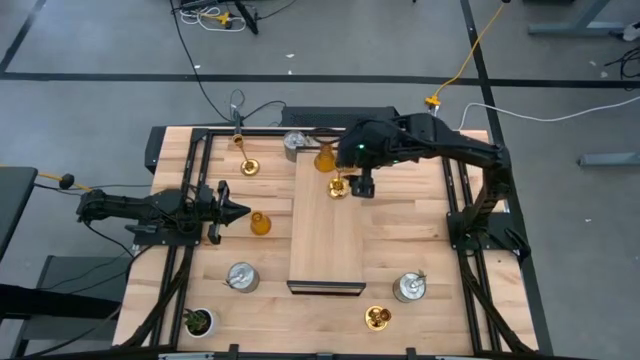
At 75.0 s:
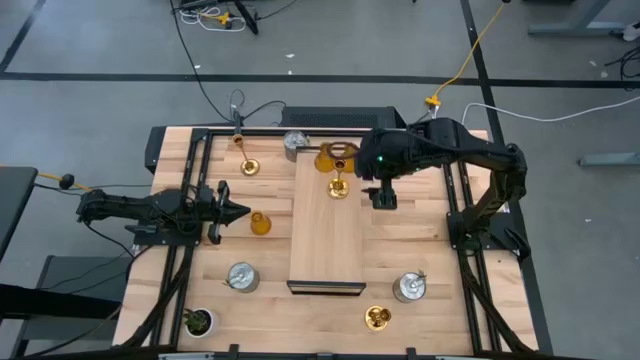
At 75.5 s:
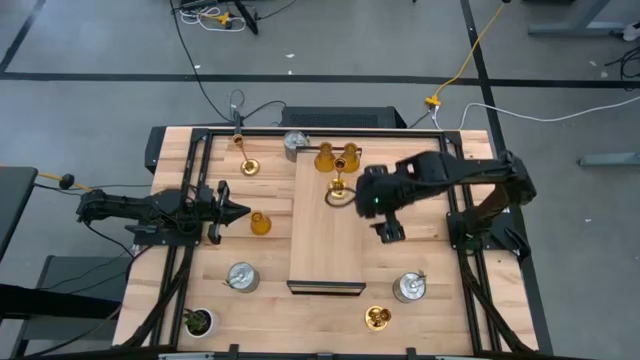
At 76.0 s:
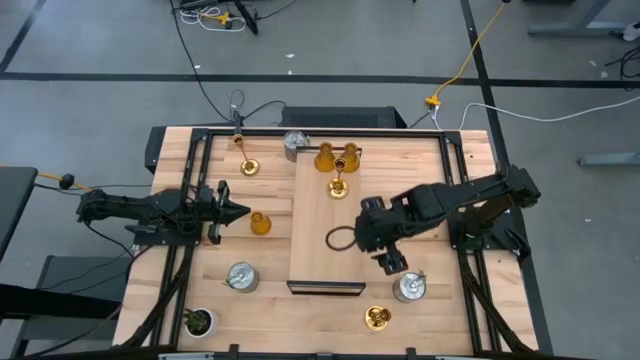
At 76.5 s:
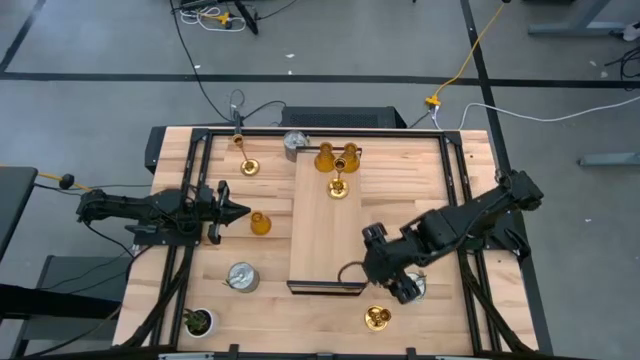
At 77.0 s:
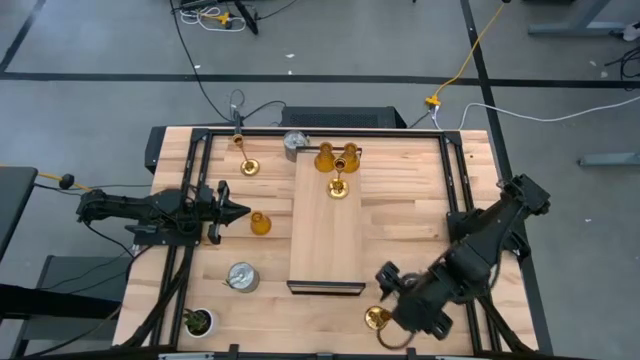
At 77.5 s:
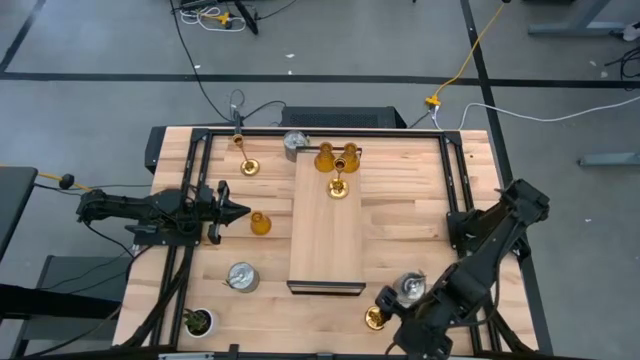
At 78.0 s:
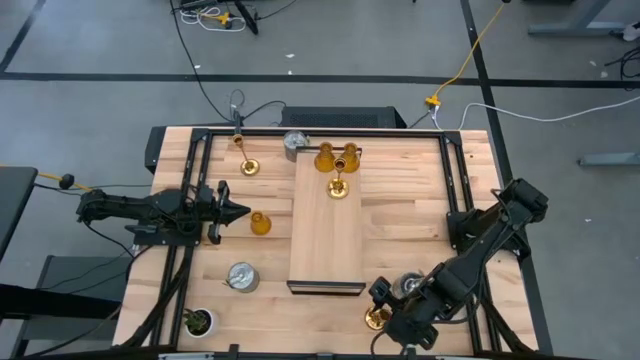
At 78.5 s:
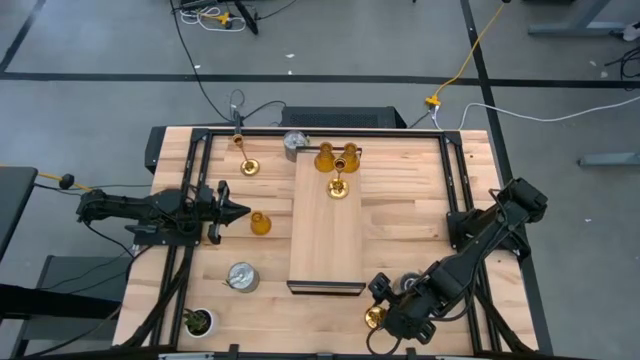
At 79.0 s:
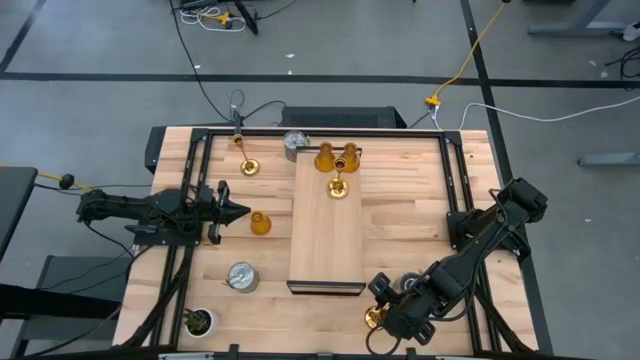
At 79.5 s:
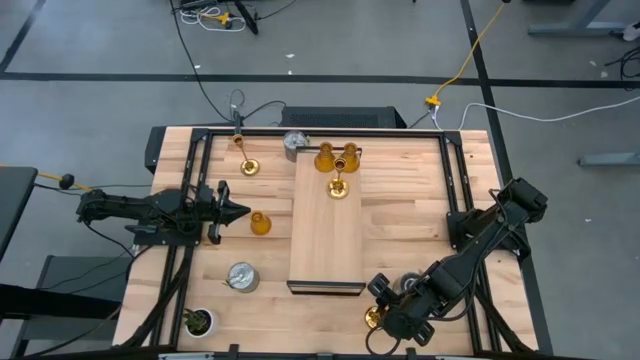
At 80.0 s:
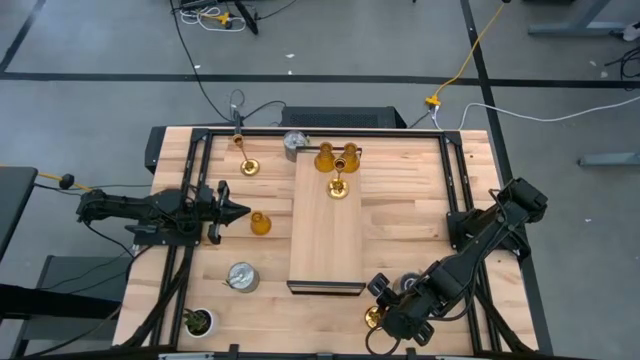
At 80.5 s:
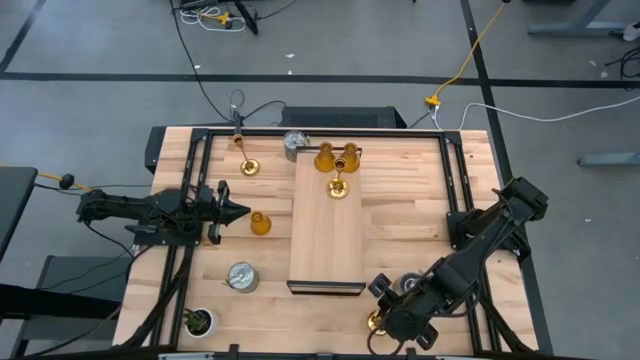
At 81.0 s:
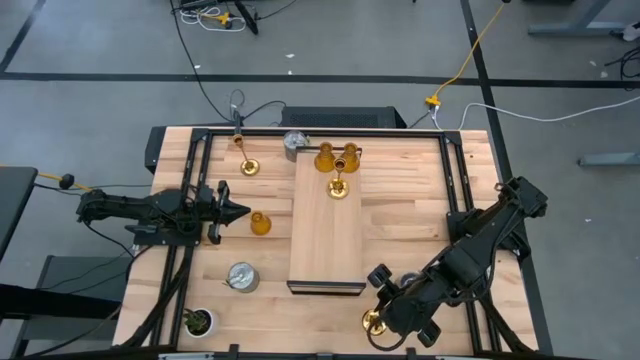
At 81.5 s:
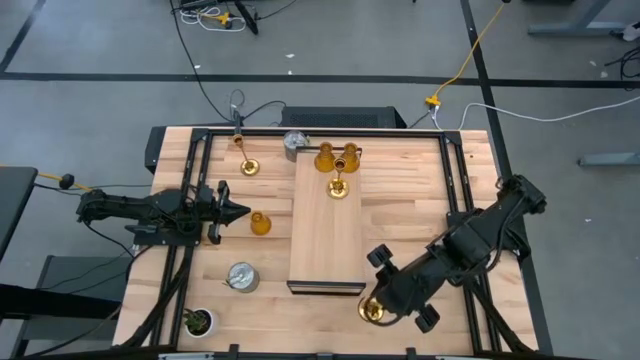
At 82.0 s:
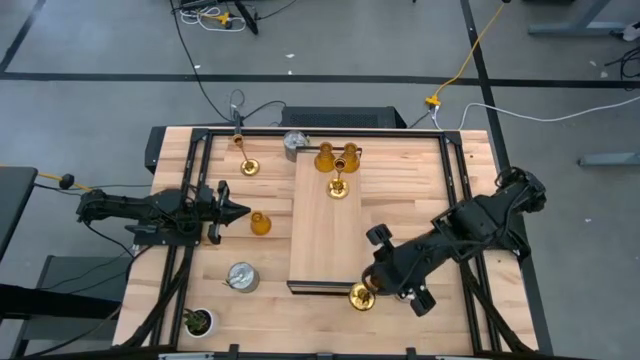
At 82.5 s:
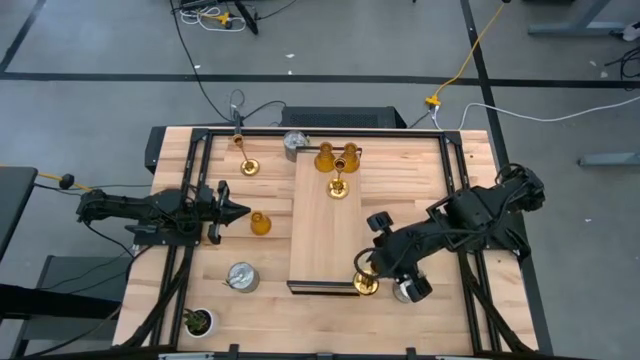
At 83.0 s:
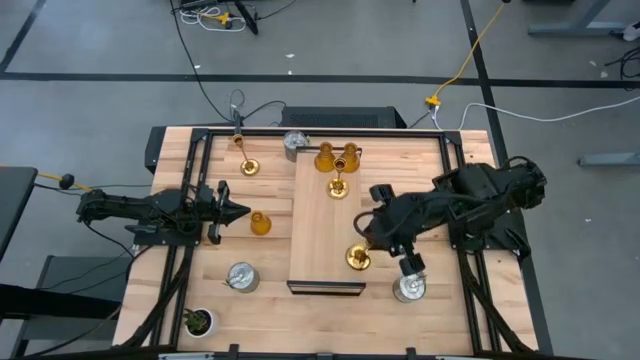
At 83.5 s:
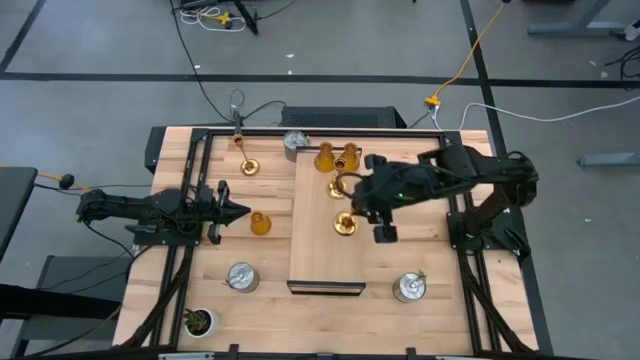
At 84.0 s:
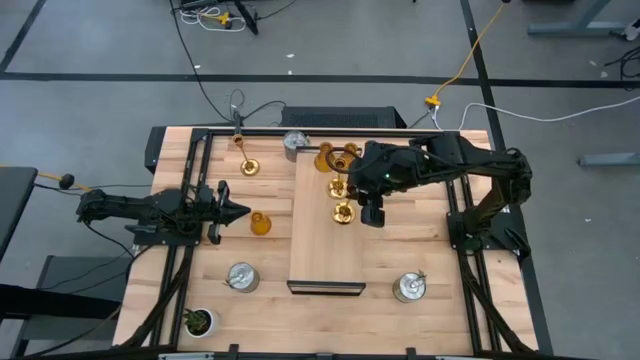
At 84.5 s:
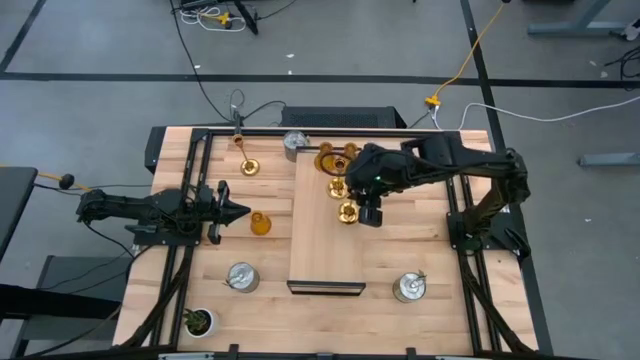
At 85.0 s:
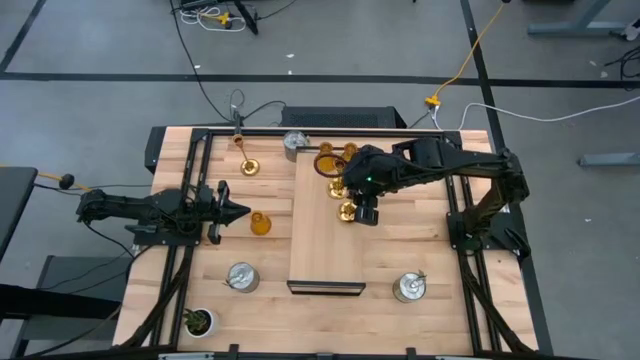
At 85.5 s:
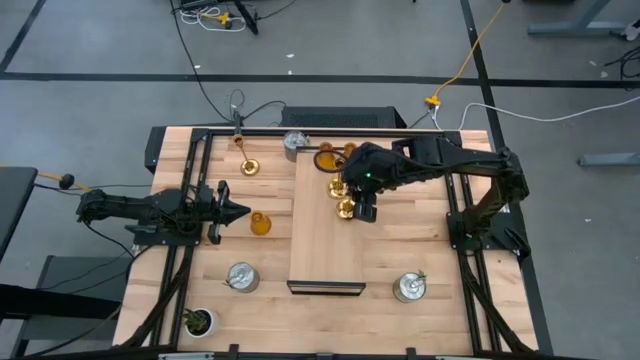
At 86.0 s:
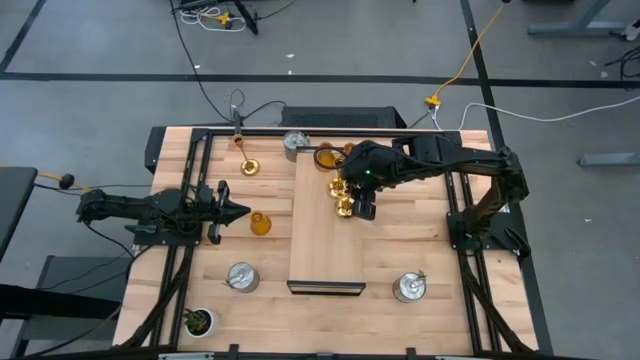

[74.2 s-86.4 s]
Task: Pick & Place candle stick holders
Put the bottom candle holder on the shelf

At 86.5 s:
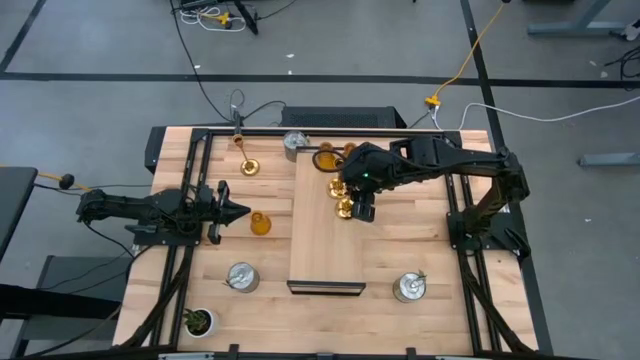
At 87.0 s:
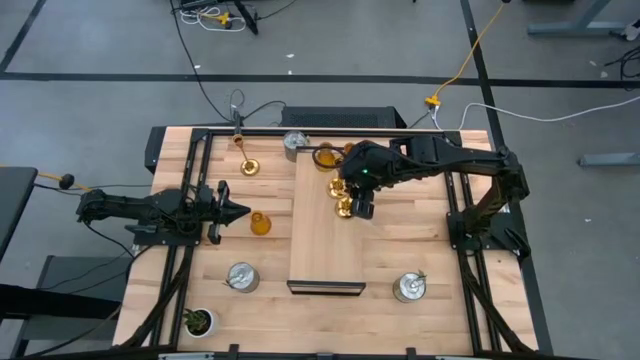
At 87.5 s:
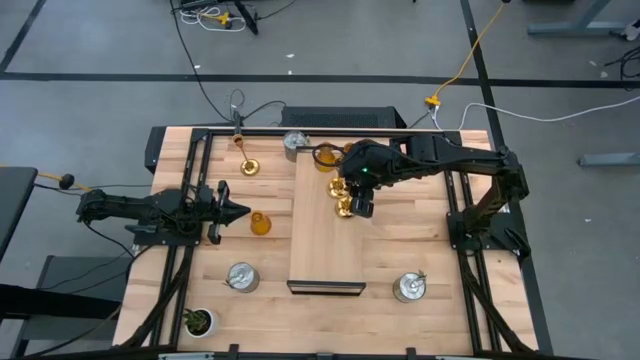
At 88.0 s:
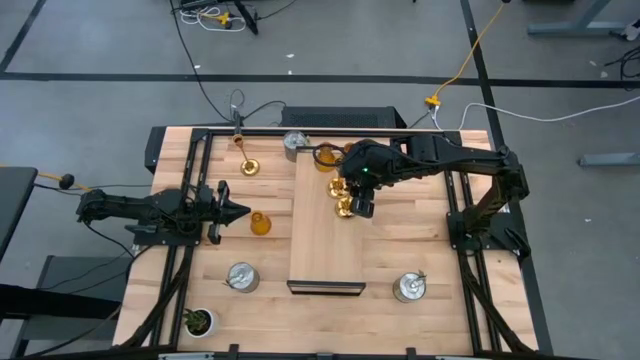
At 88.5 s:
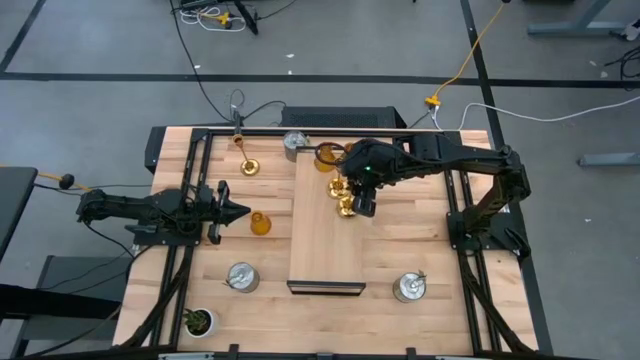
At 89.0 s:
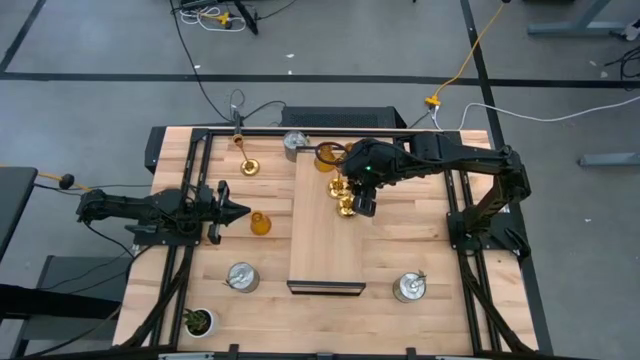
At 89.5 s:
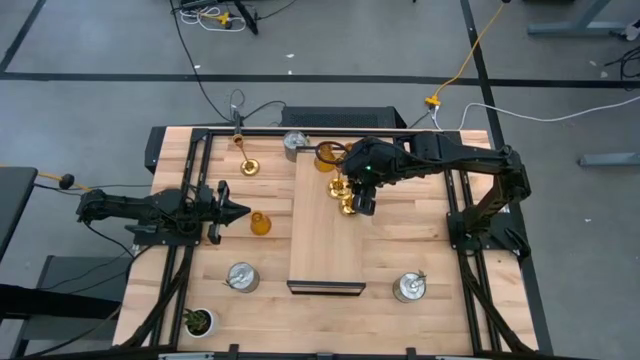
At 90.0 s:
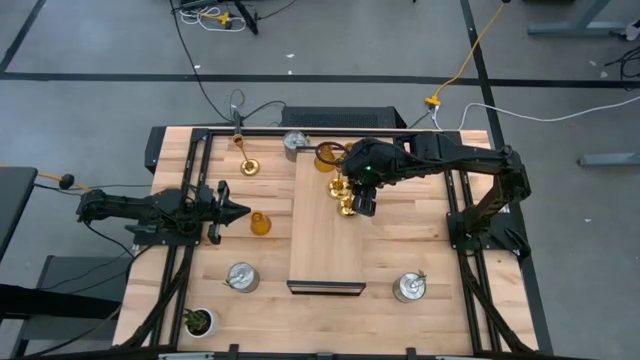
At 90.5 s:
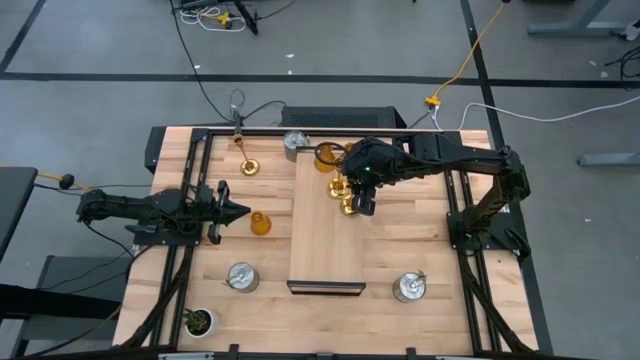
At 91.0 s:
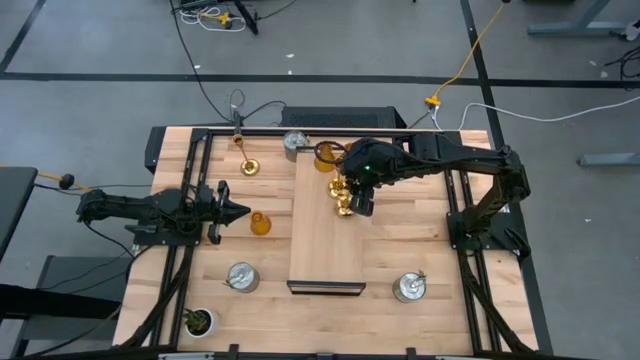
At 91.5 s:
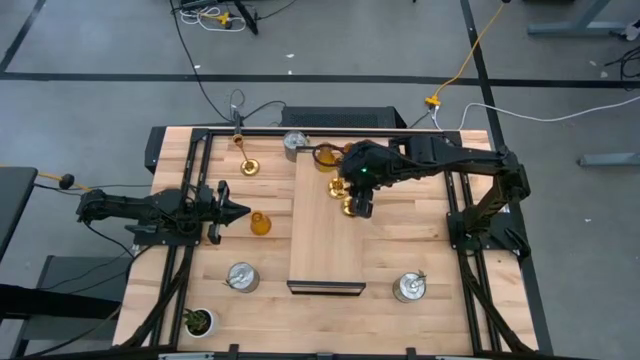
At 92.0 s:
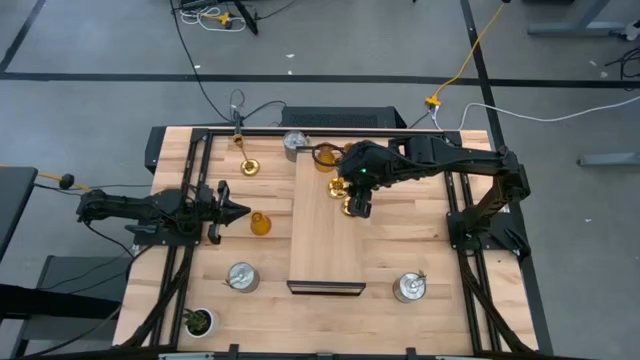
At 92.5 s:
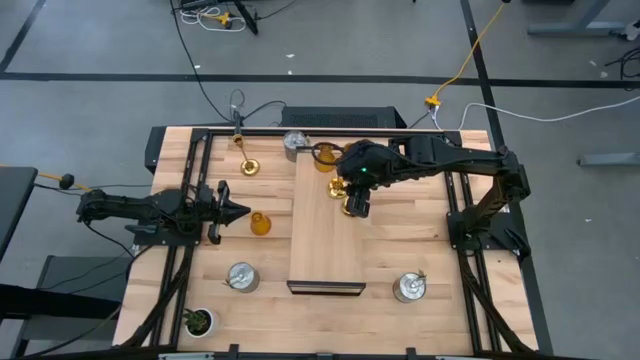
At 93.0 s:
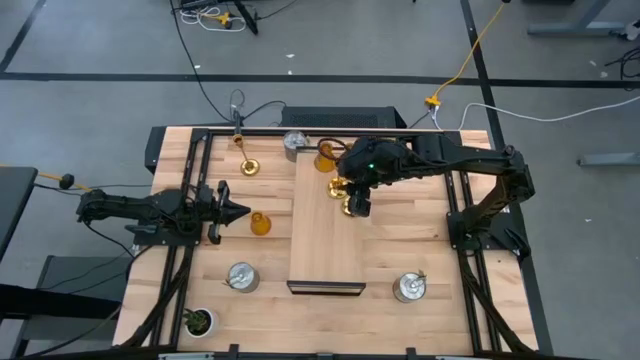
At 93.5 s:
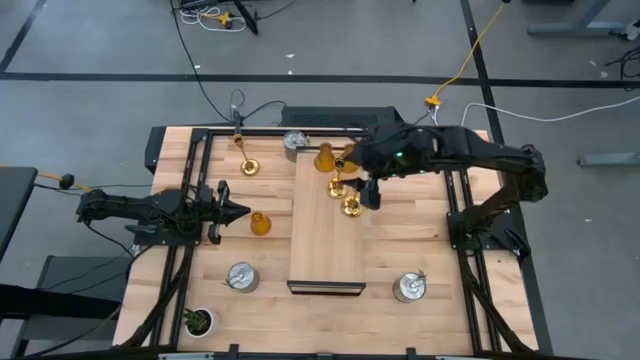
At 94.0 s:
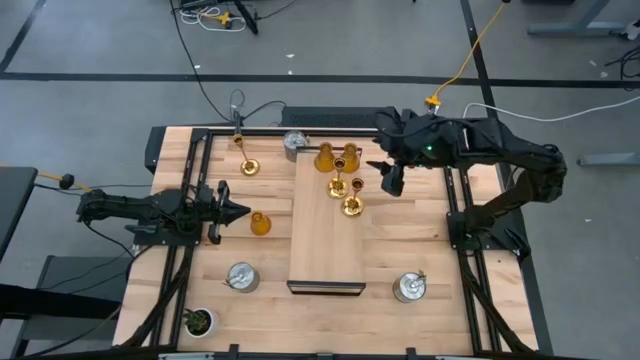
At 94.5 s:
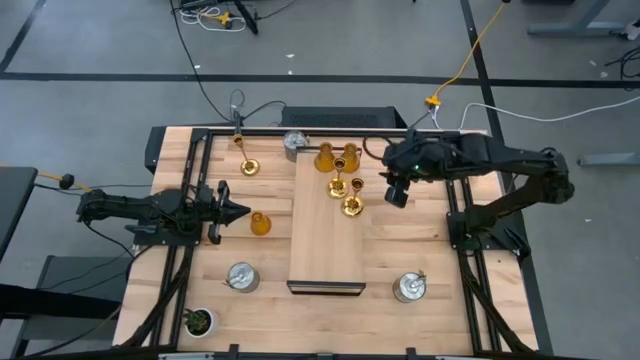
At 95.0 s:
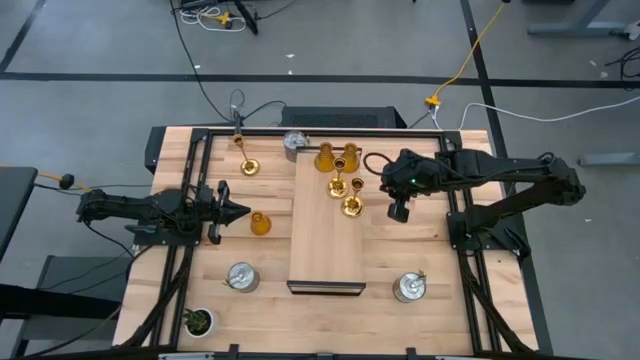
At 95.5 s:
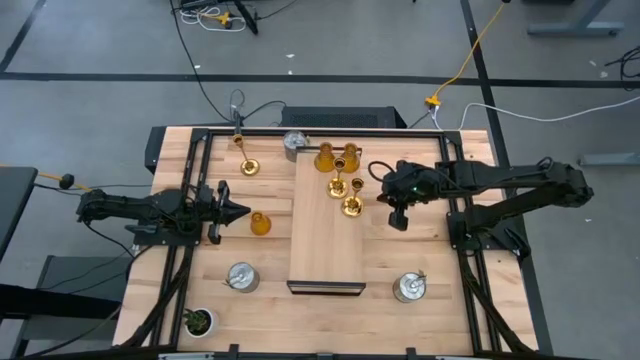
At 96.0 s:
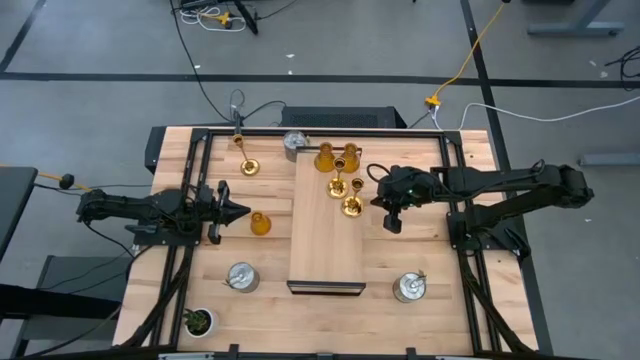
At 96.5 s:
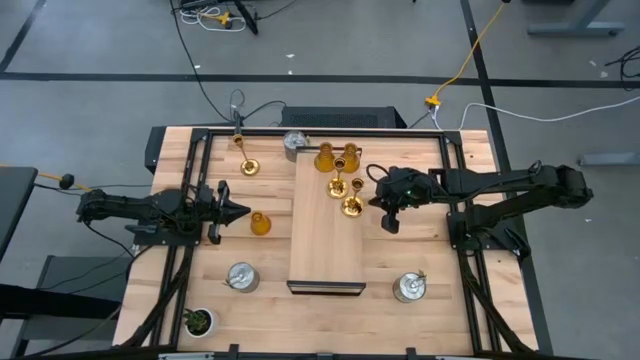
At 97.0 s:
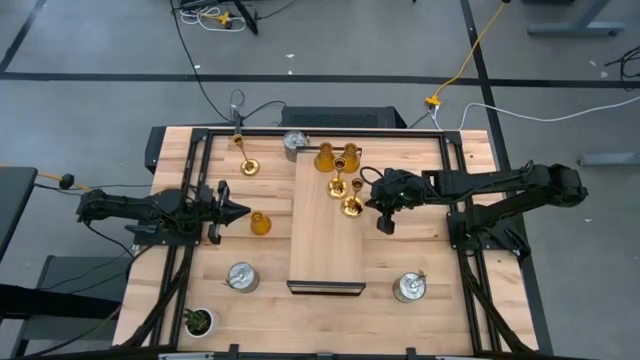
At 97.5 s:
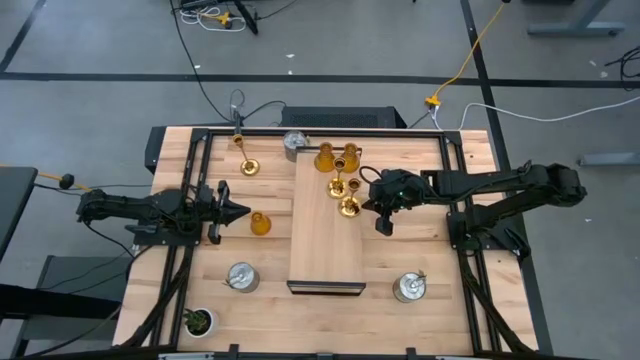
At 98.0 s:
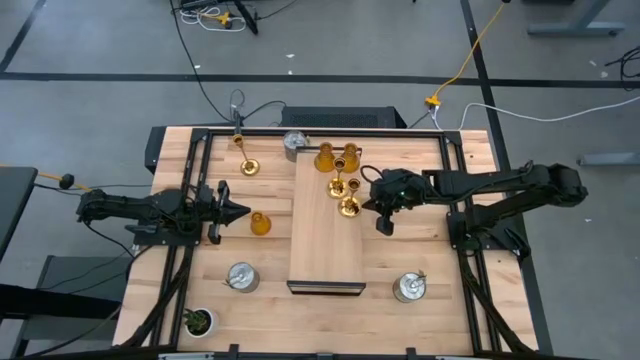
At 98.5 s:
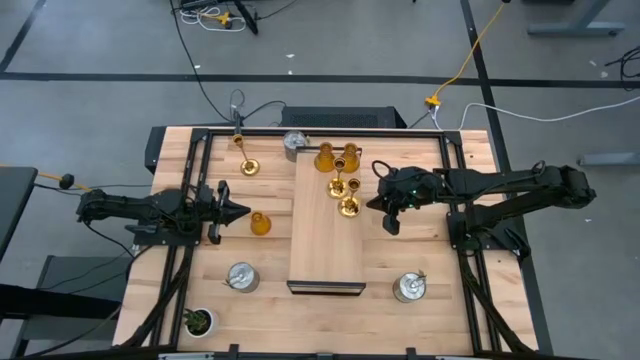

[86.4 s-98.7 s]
Put the bottom candle holder on the shelf
